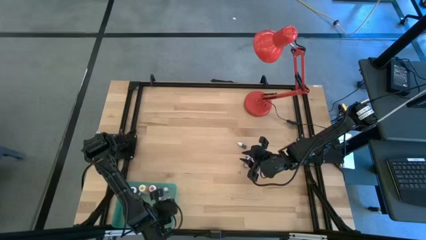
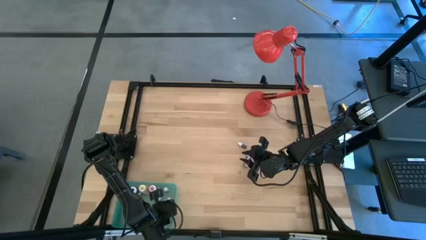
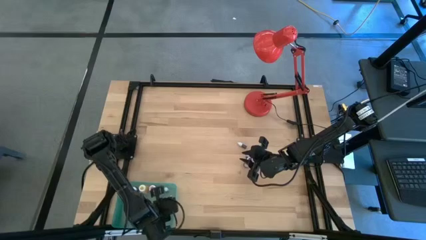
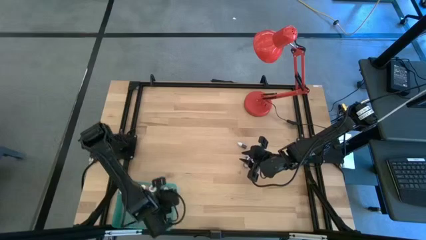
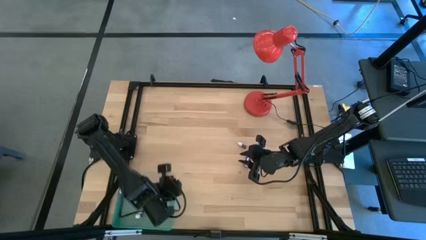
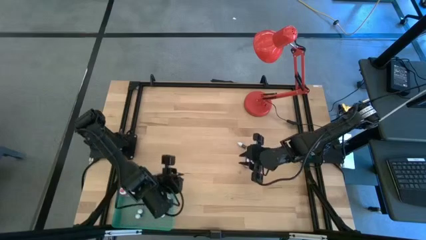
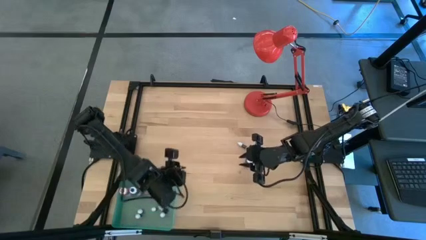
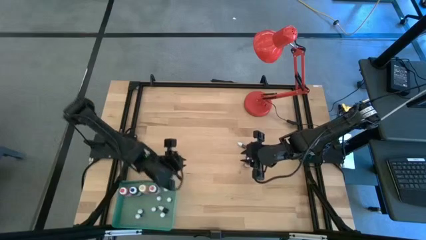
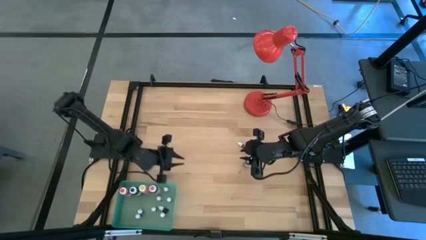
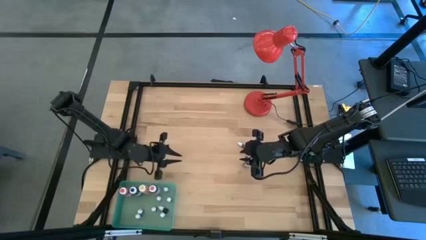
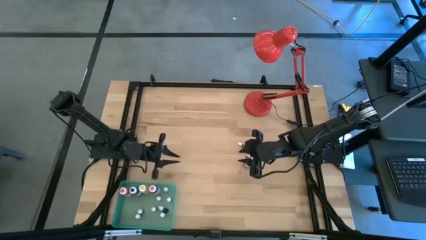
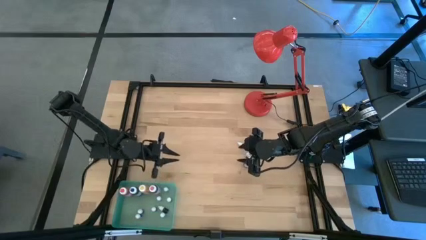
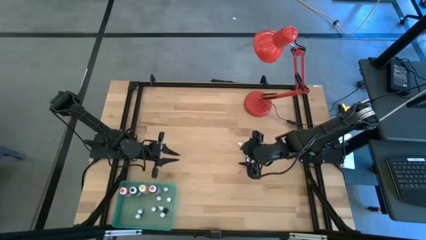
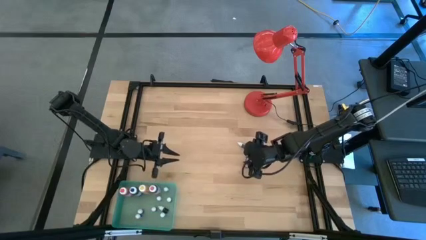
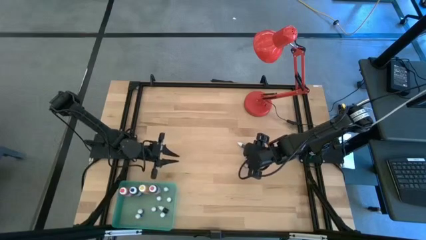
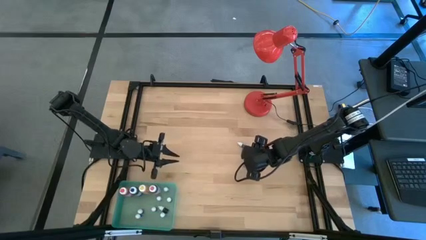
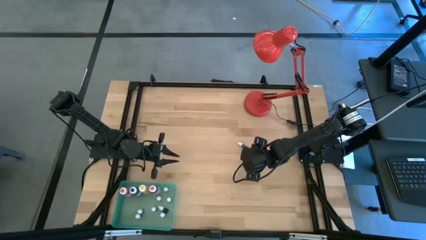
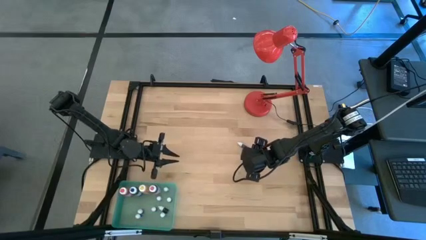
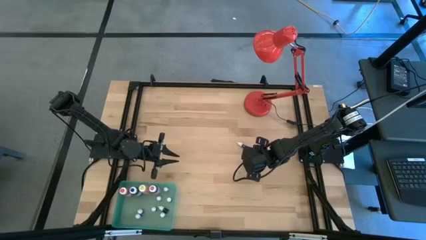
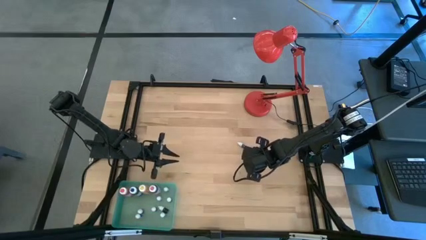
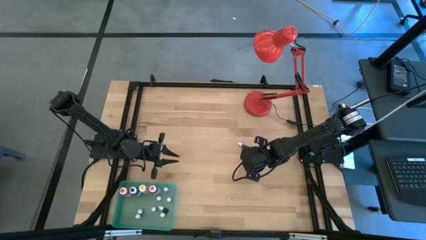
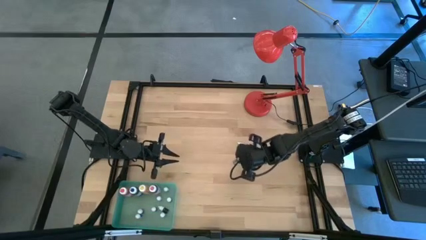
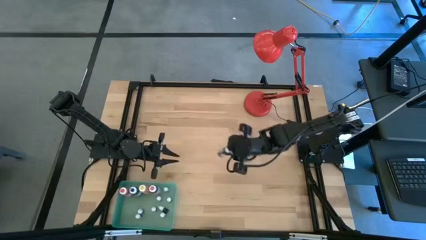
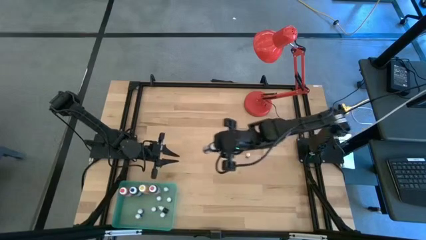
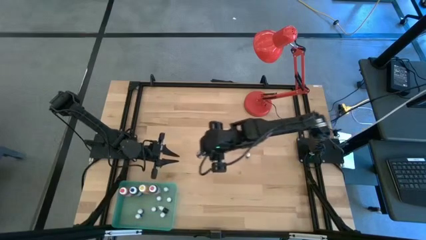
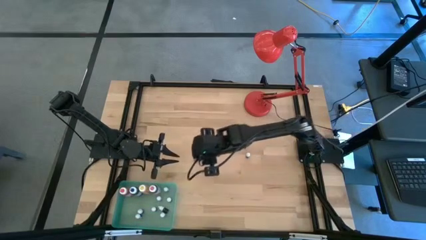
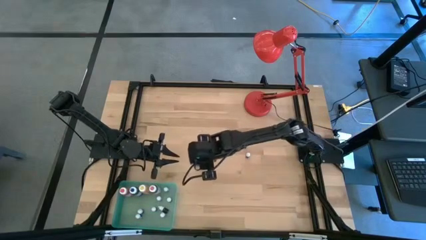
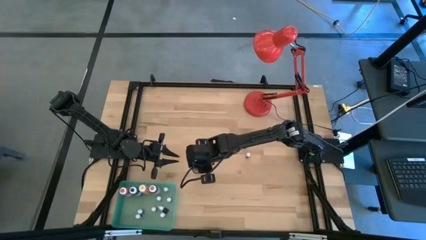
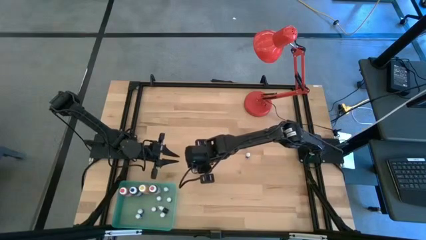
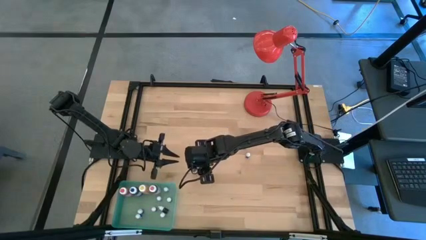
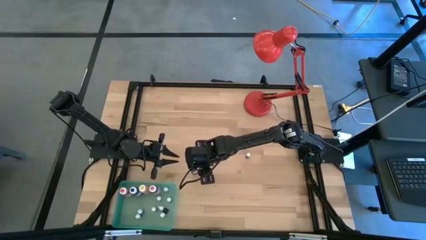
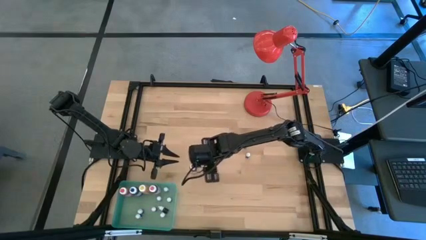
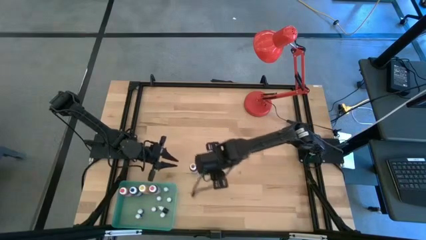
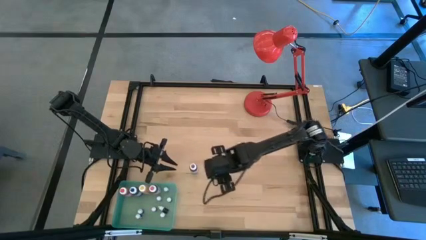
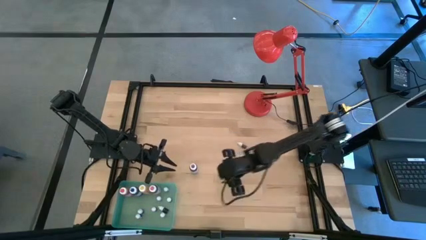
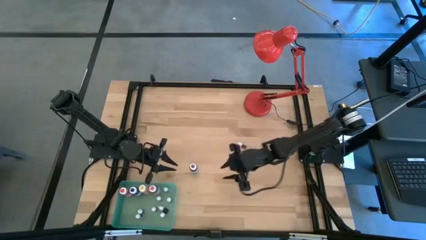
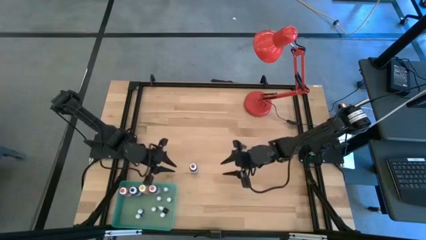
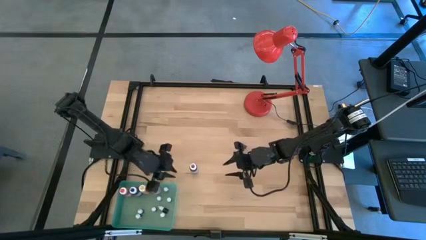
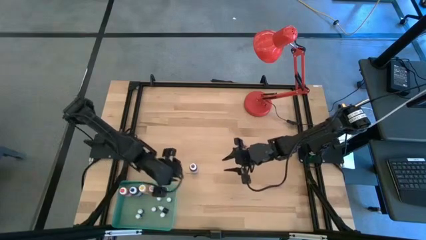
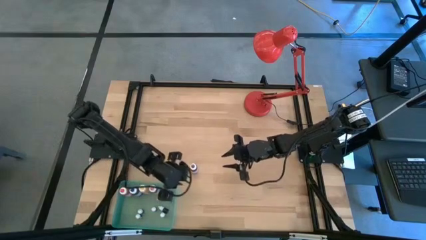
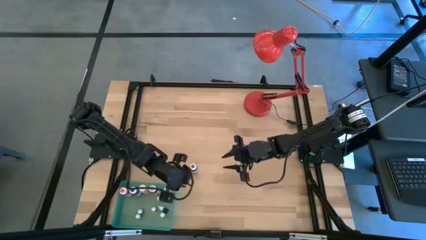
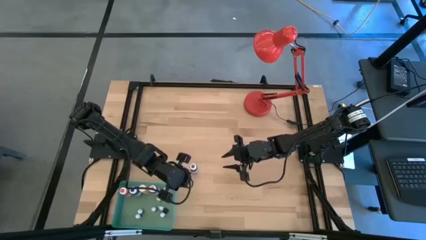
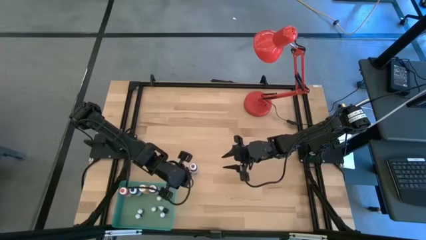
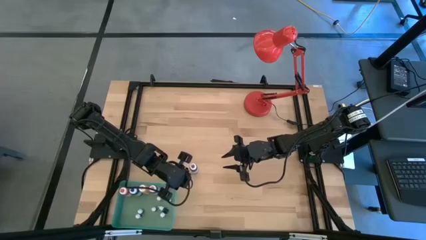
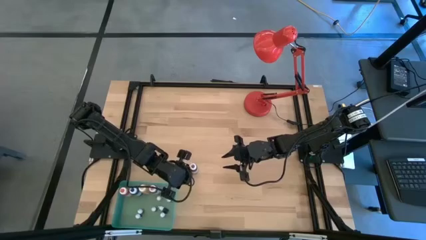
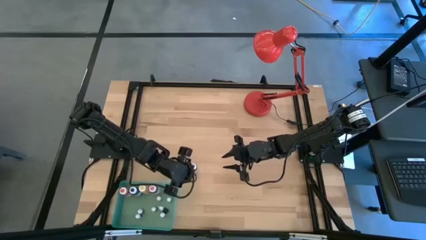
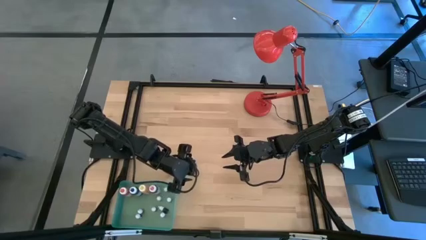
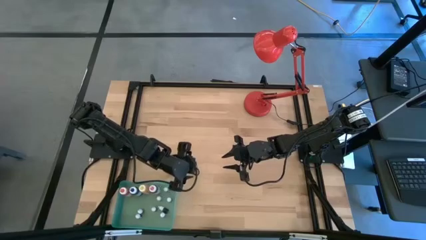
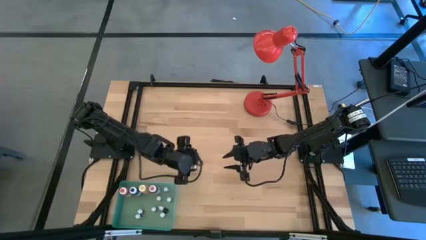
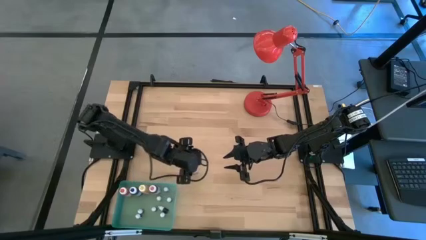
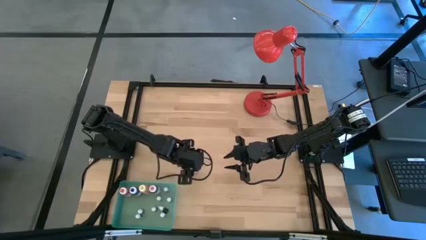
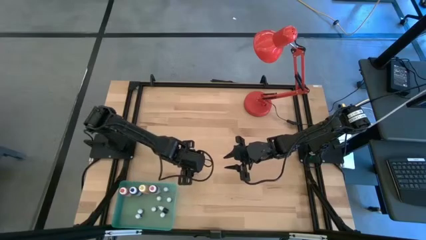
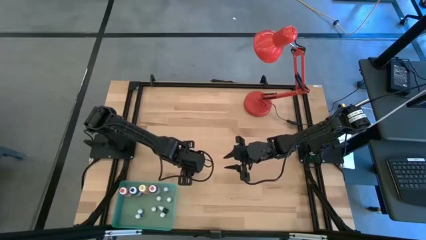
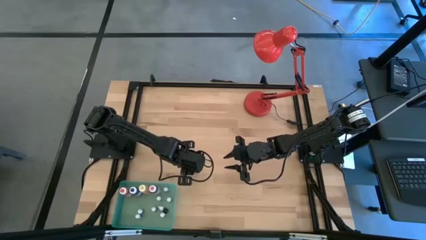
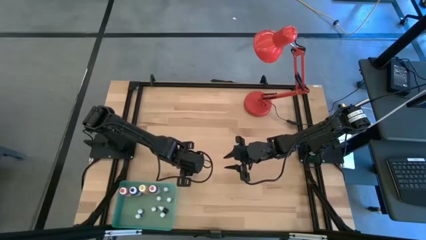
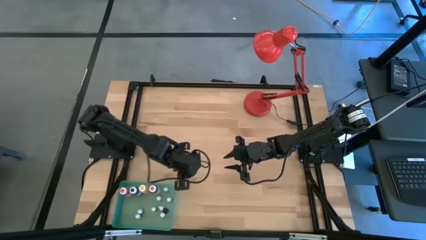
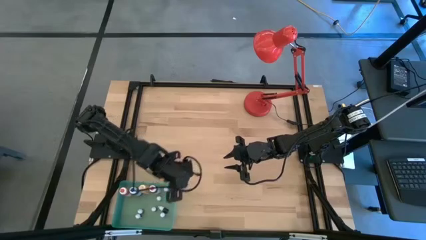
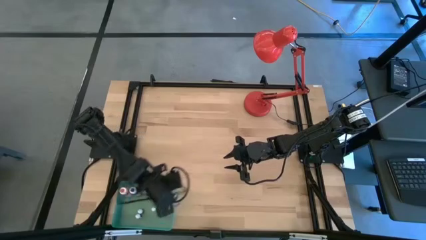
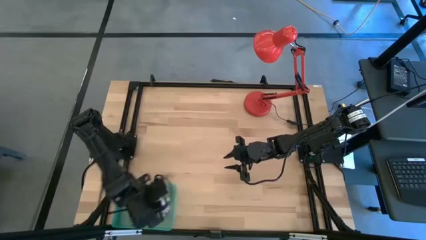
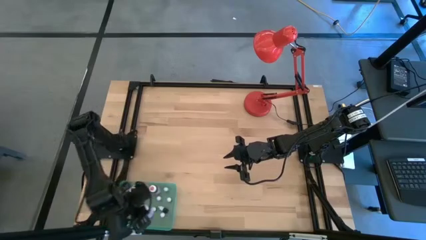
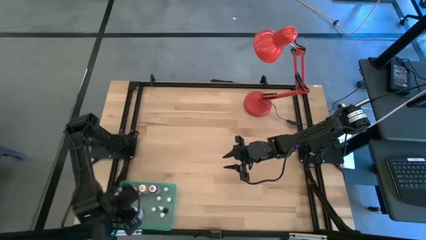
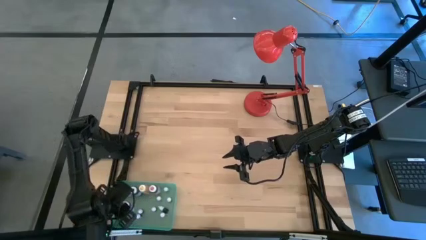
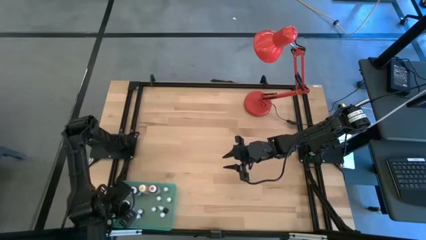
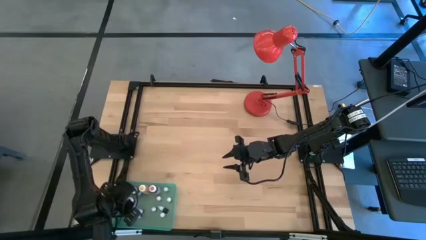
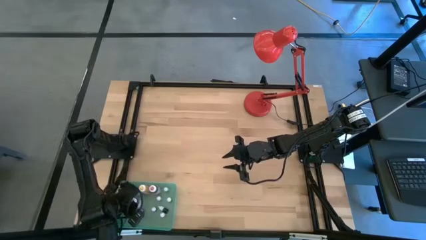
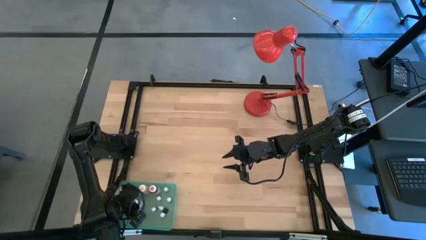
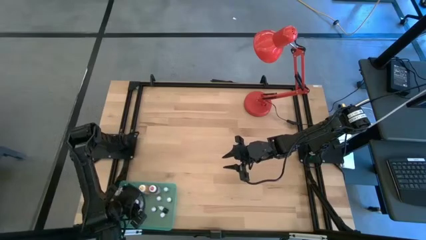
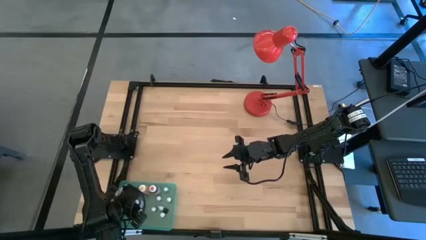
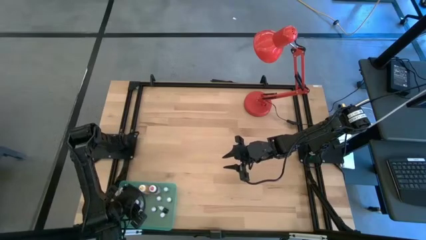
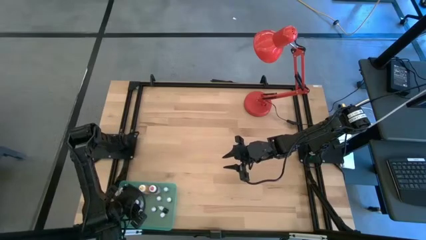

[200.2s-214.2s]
Task: Pick & Place food coloring
Put the violet food coloring into the blue bin
